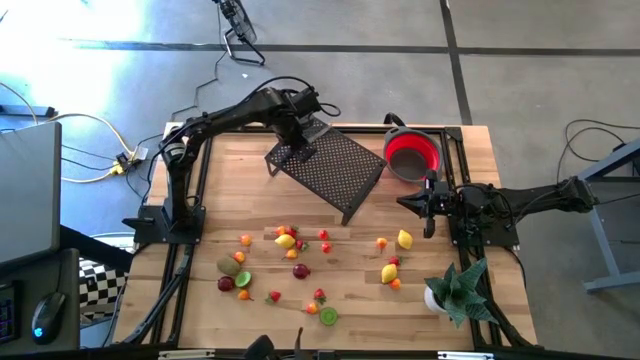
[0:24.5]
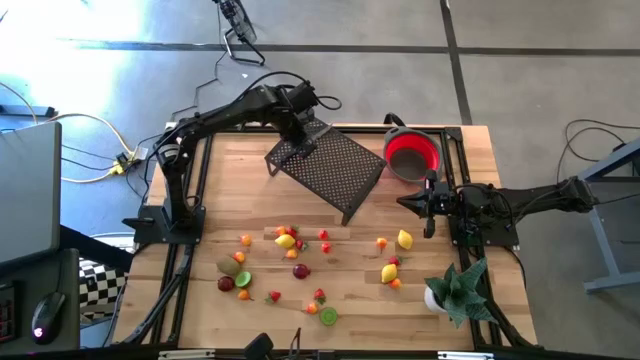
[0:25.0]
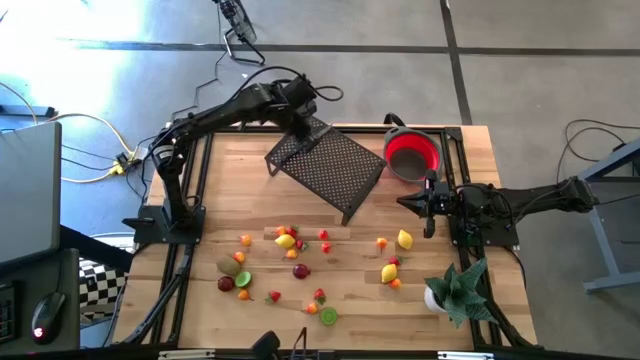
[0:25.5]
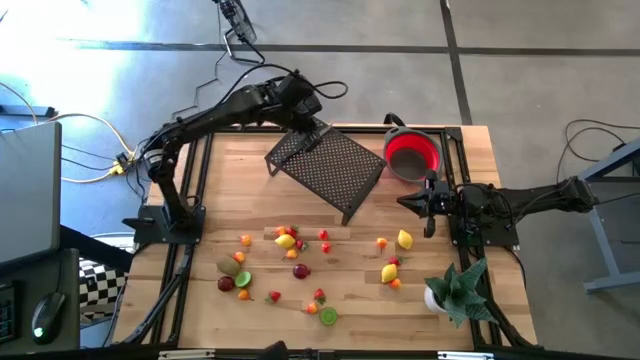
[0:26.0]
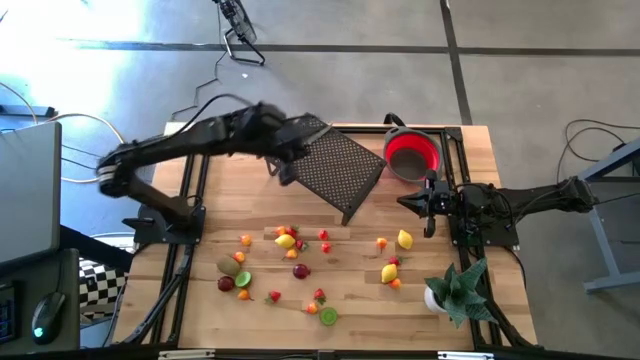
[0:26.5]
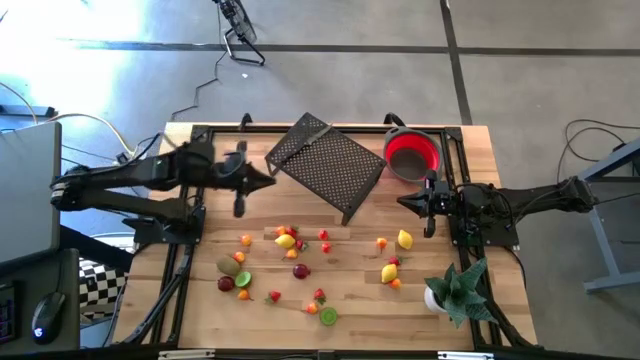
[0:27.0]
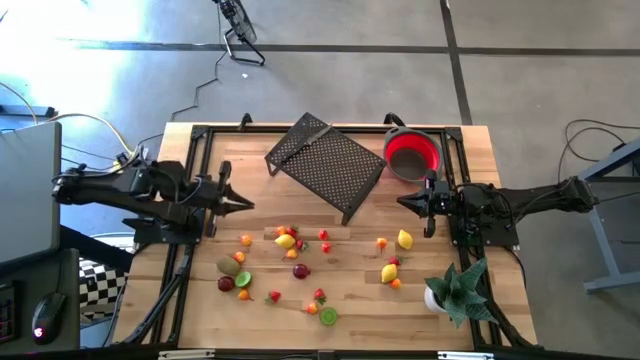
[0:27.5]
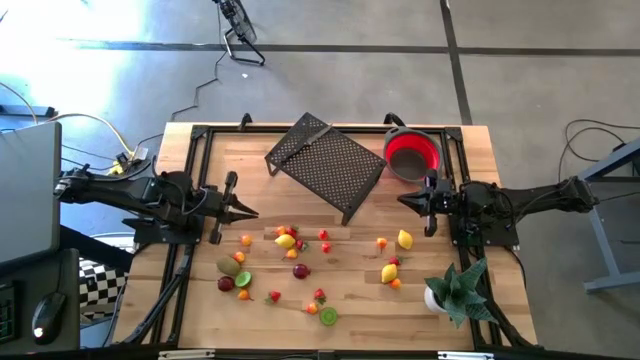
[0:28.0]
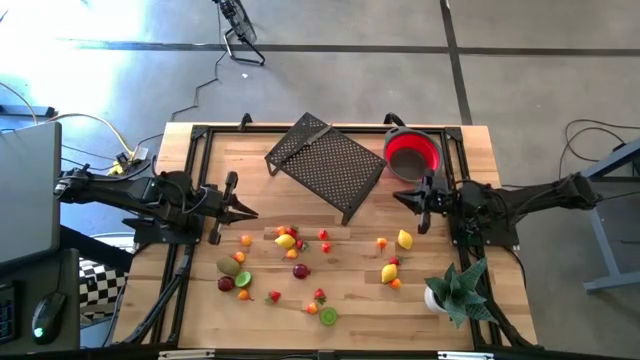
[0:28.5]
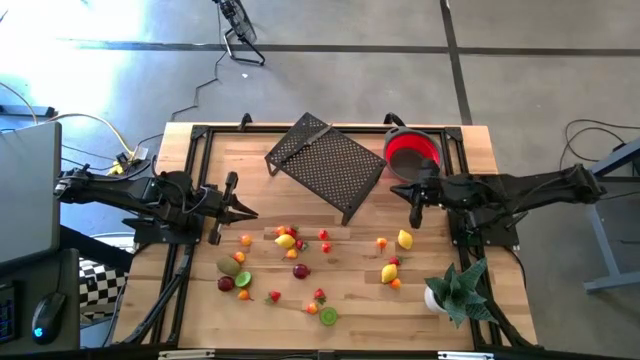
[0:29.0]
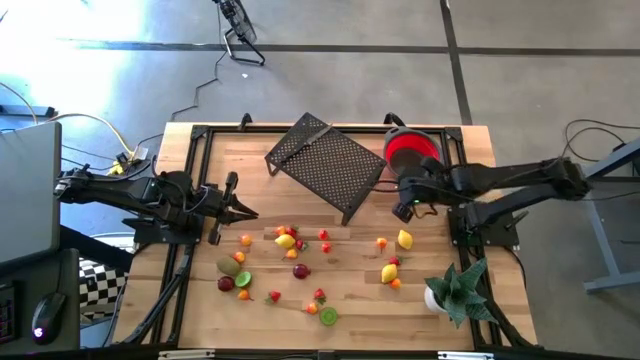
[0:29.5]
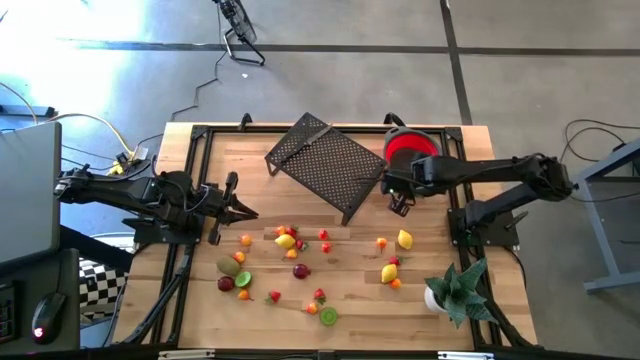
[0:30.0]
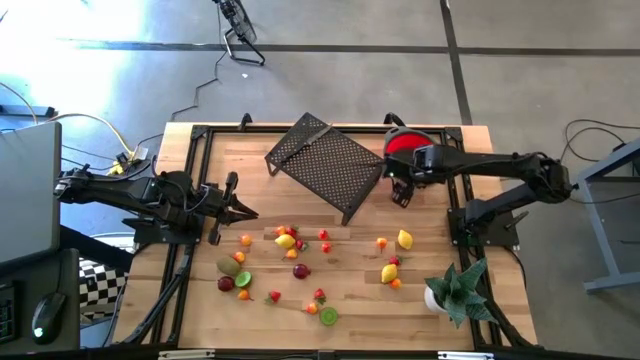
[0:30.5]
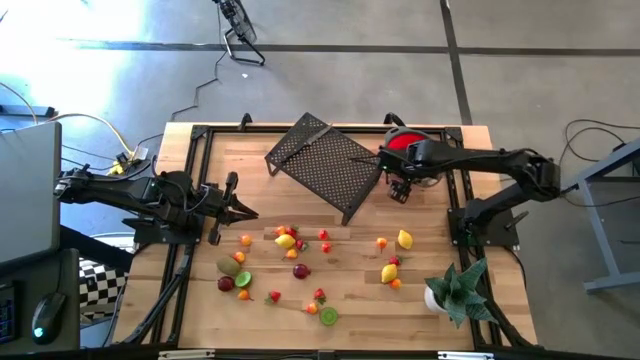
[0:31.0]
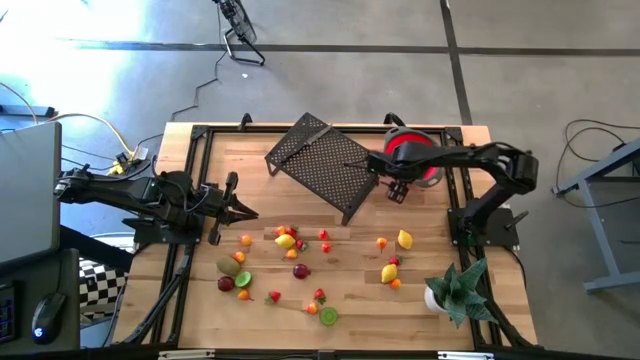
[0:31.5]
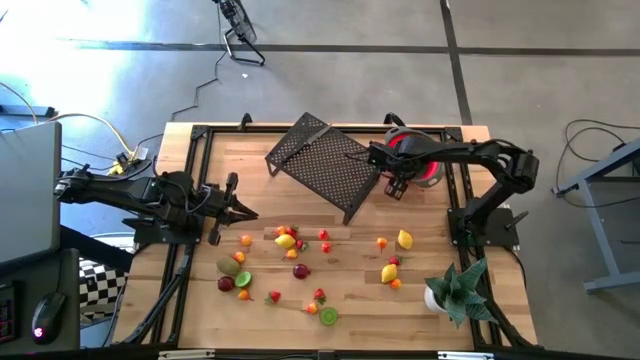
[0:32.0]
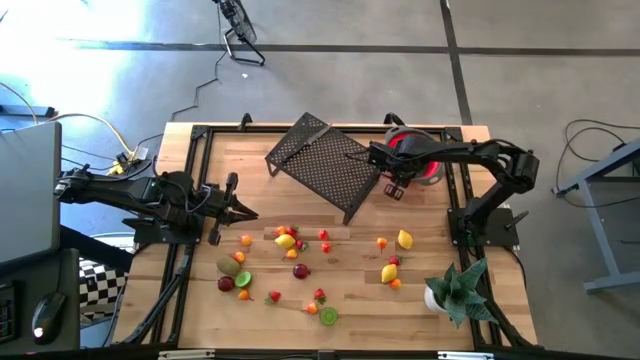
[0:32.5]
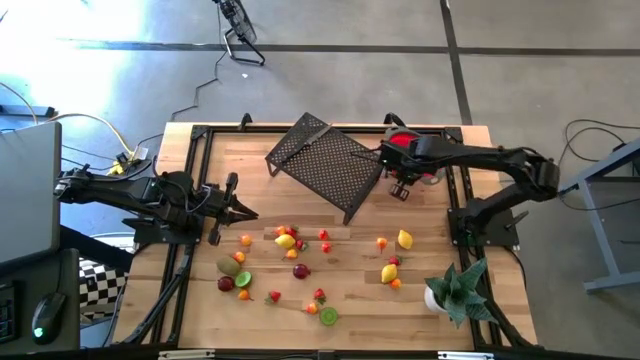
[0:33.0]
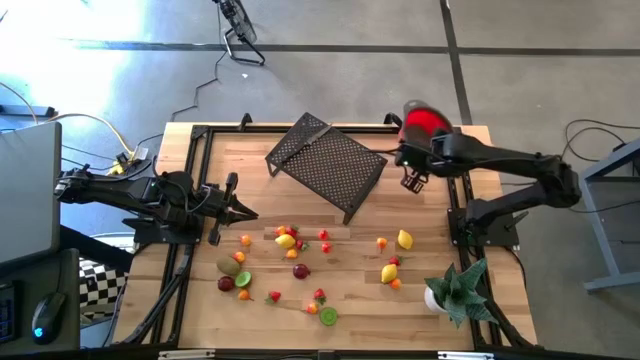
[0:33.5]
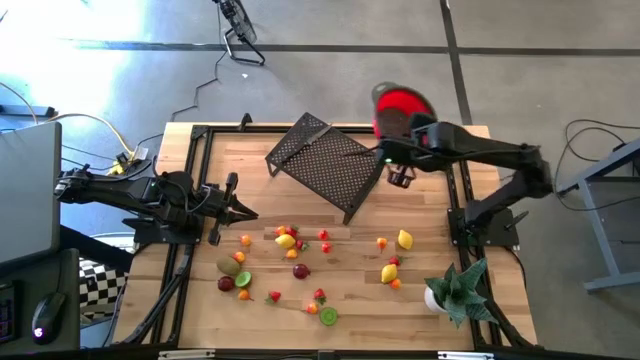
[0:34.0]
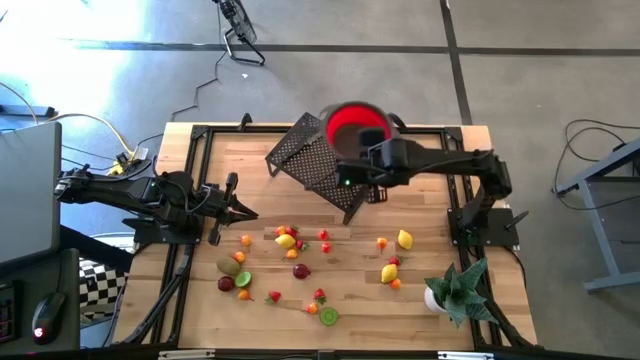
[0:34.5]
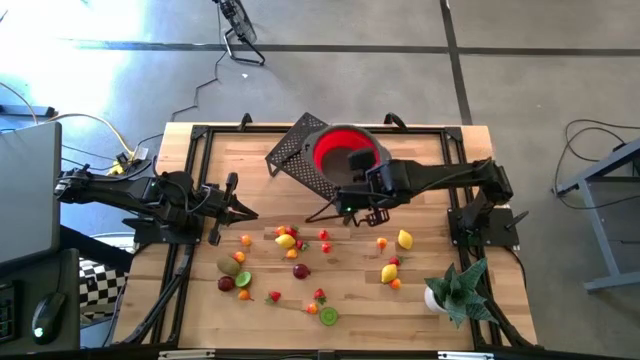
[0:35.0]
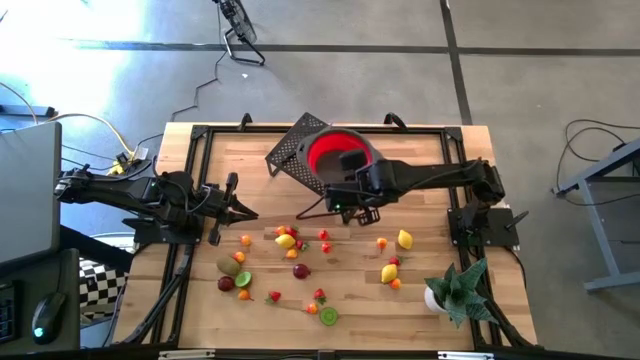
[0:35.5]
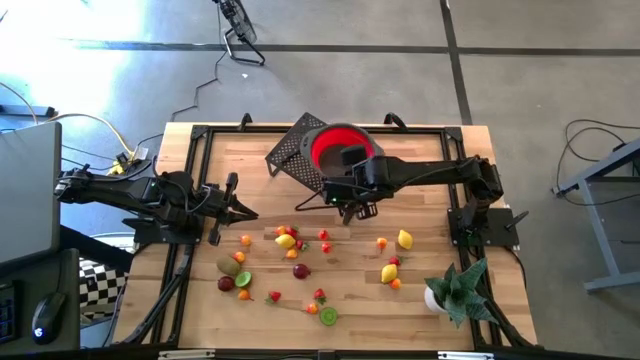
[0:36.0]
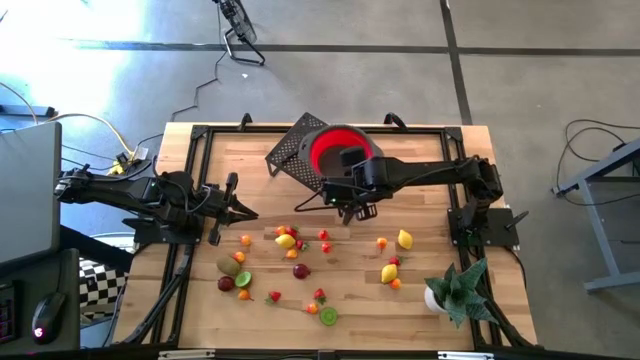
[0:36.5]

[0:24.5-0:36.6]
Task: Pick & Place Fruit
Put the strainer bowl on the shelf

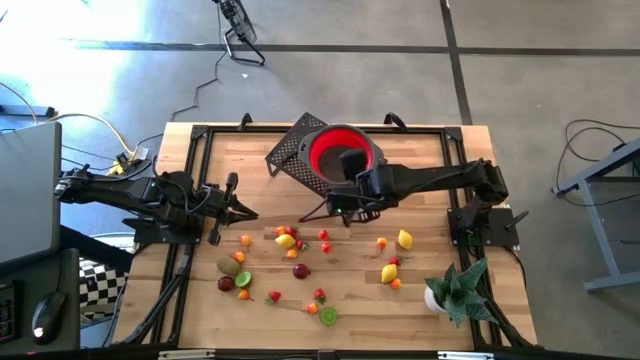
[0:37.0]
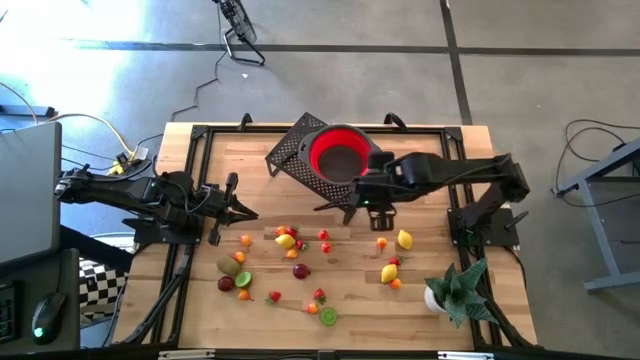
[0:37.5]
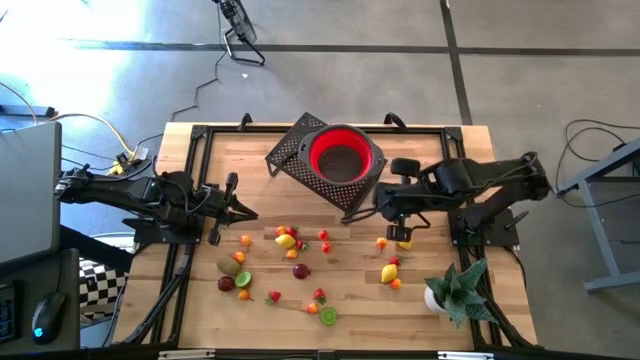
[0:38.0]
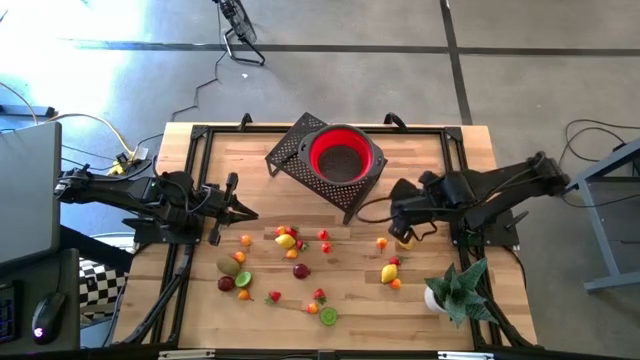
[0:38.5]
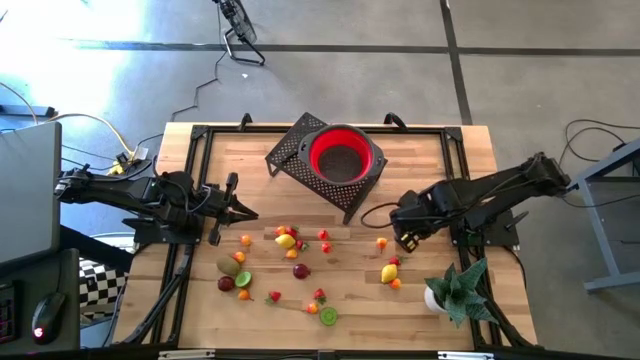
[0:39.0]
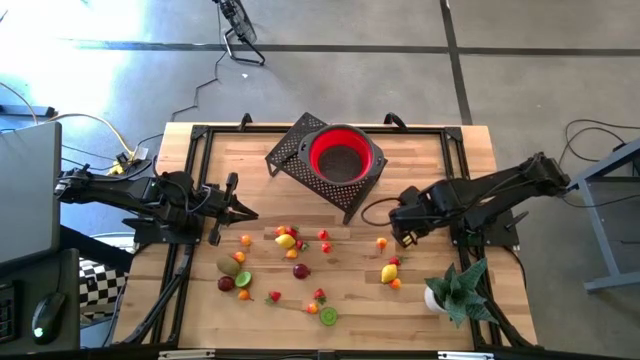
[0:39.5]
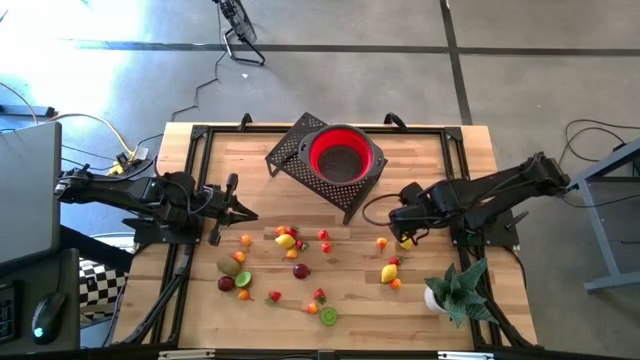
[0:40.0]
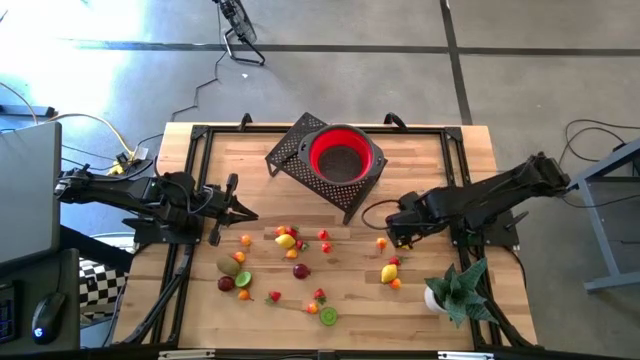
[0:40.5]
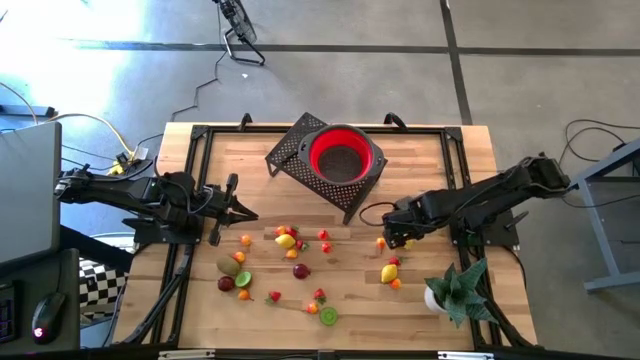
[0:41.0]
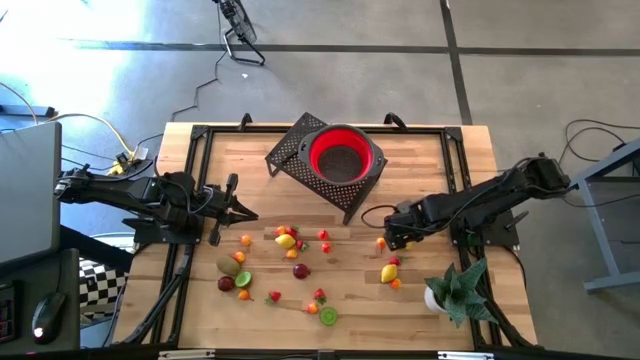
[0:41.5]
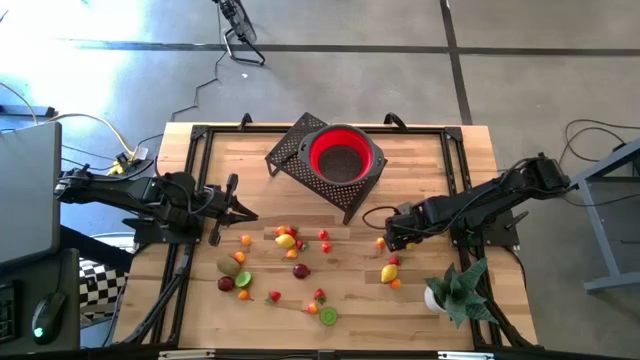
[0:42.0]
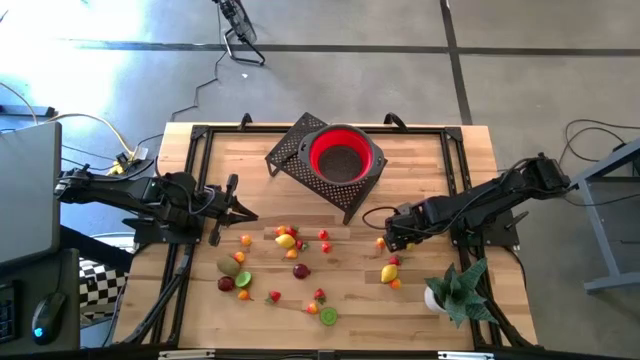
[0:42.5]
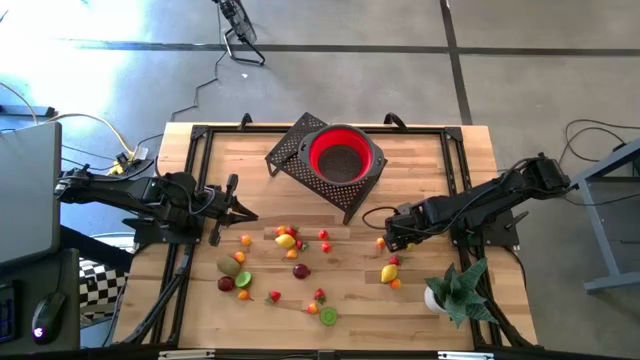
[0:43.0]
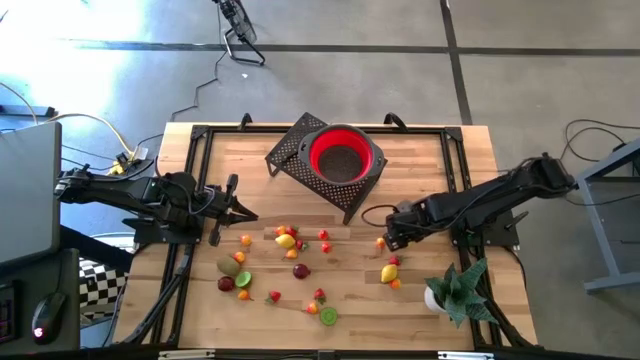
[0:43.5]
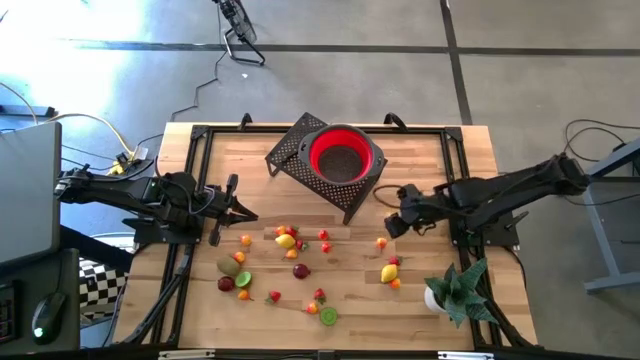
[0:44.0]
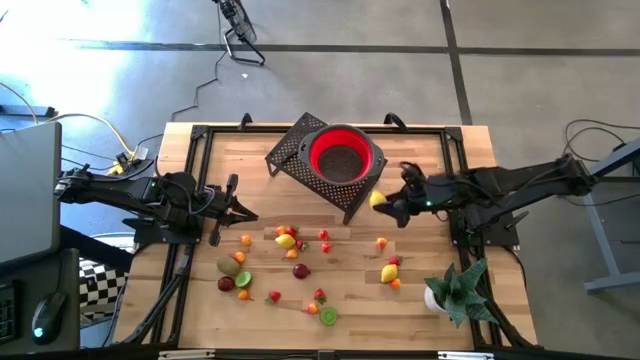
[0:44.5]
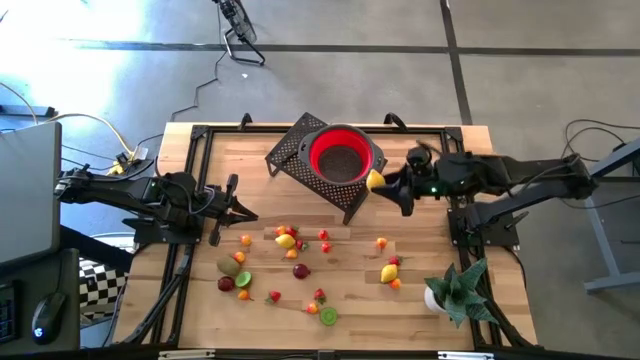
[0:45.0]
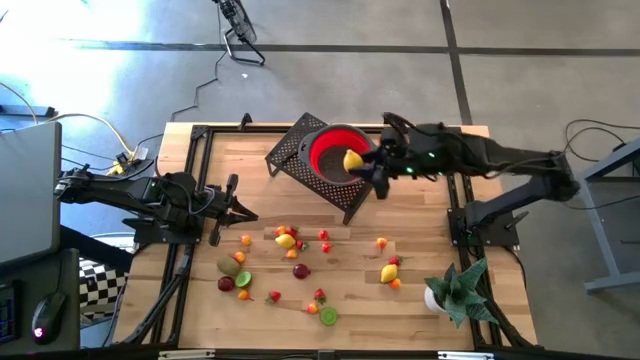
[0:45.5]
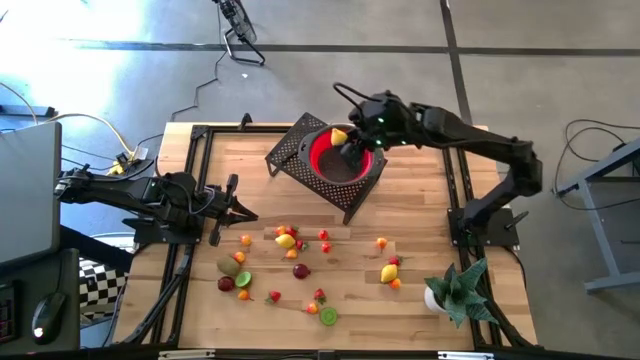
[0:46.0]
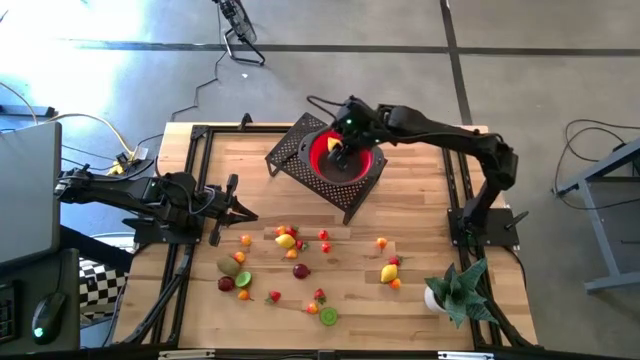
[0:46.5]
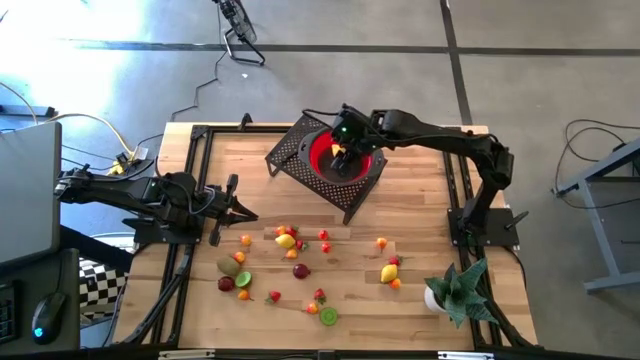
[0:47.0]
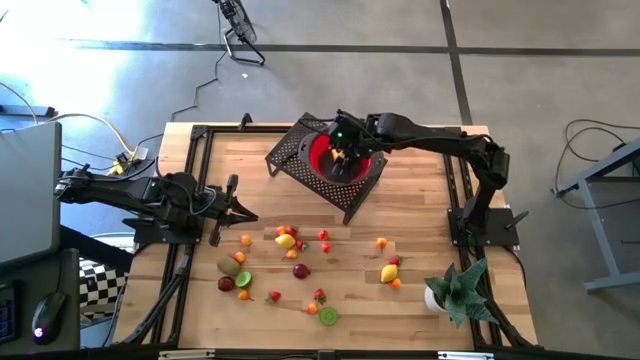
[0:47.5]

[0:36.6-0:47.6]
Put the lemon into the strainer bowl on the shelf
